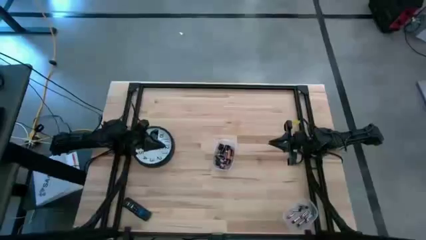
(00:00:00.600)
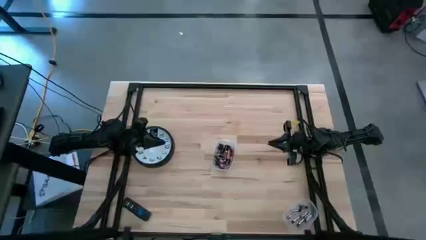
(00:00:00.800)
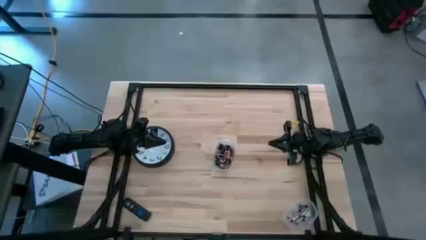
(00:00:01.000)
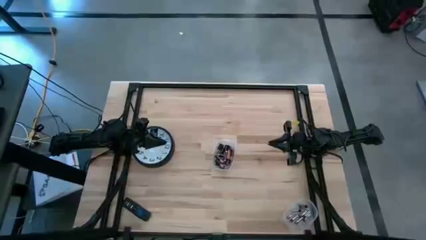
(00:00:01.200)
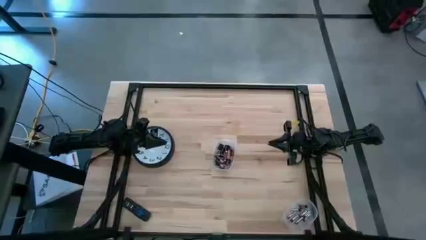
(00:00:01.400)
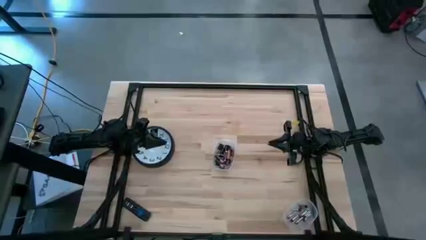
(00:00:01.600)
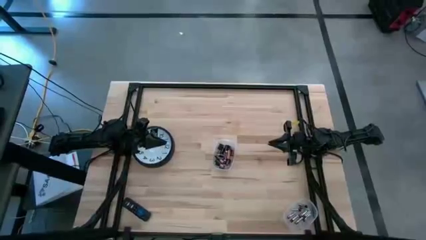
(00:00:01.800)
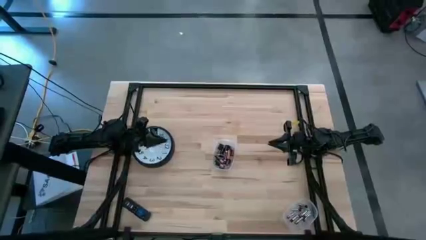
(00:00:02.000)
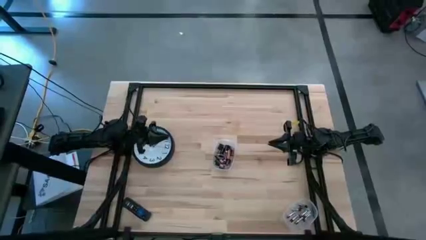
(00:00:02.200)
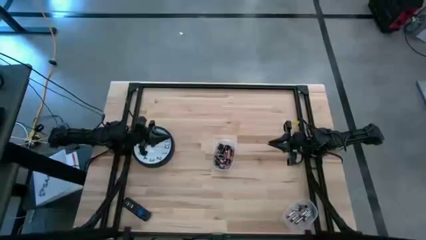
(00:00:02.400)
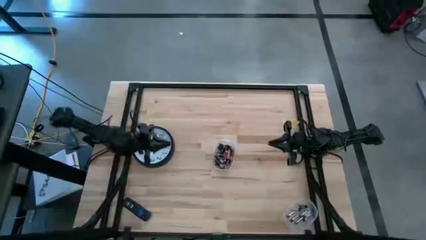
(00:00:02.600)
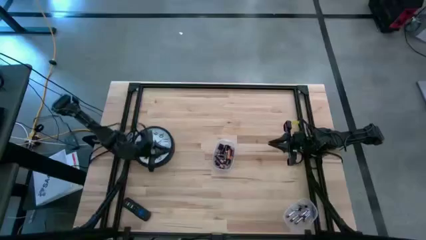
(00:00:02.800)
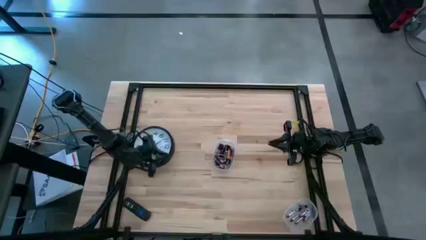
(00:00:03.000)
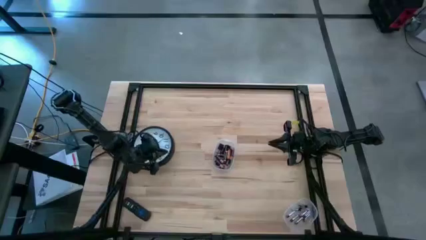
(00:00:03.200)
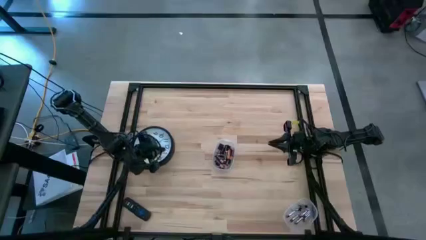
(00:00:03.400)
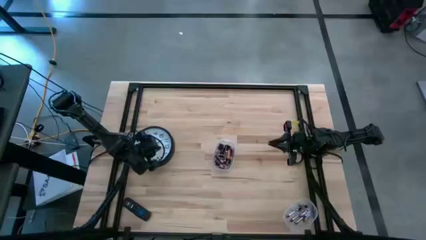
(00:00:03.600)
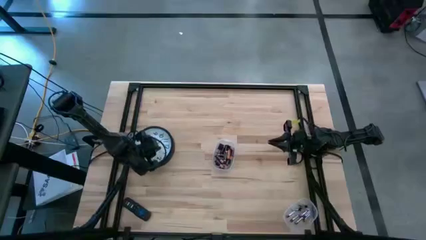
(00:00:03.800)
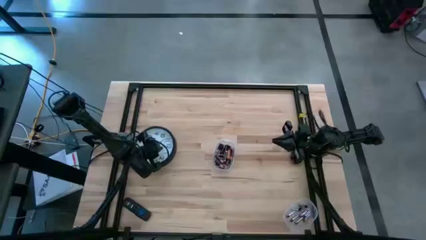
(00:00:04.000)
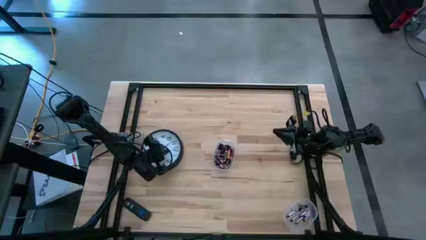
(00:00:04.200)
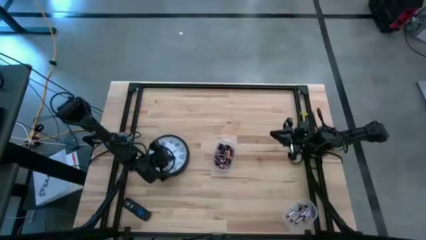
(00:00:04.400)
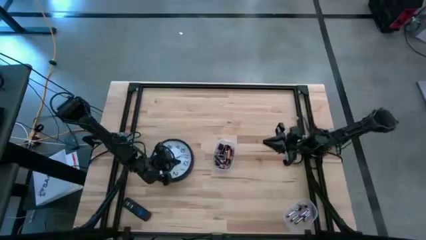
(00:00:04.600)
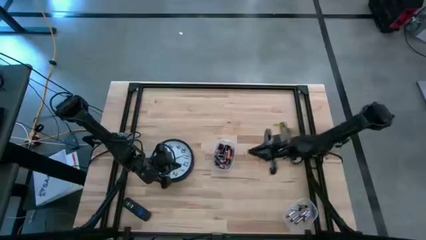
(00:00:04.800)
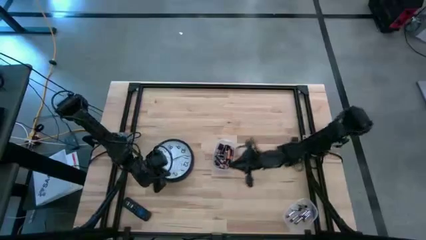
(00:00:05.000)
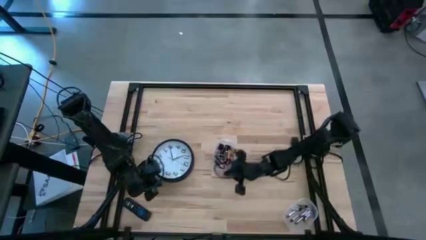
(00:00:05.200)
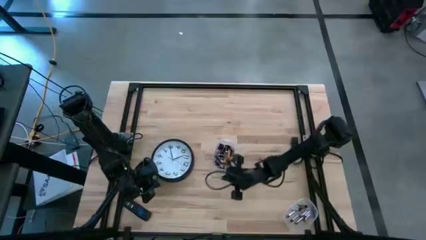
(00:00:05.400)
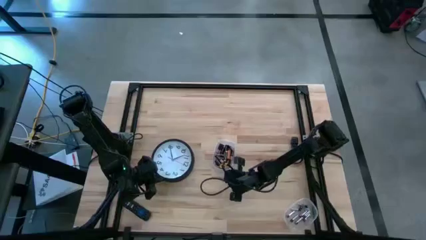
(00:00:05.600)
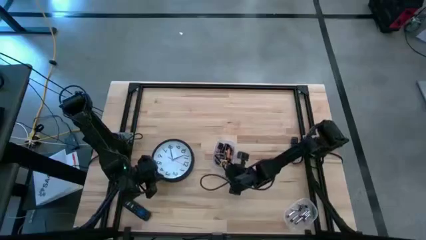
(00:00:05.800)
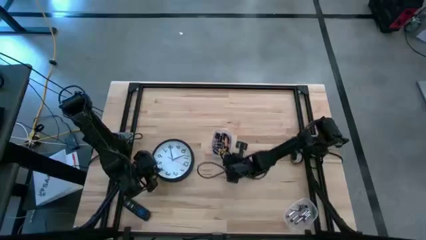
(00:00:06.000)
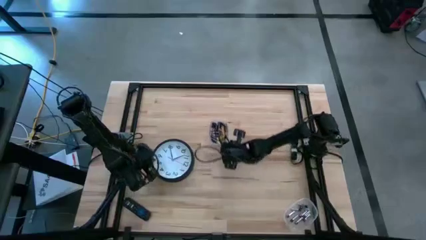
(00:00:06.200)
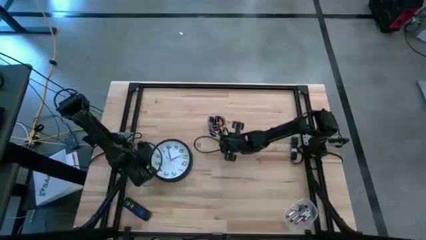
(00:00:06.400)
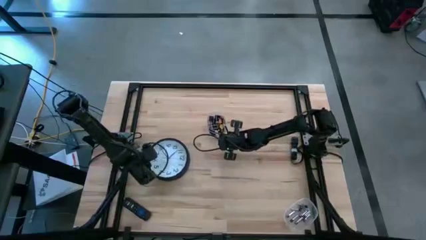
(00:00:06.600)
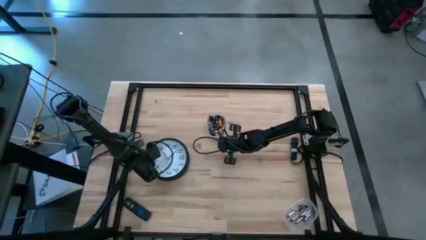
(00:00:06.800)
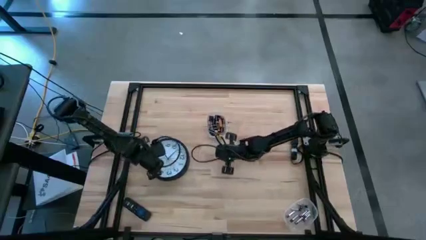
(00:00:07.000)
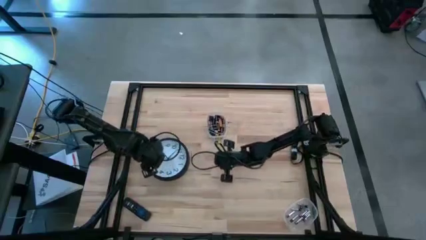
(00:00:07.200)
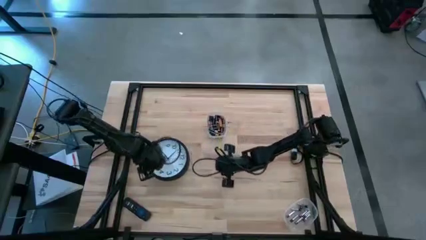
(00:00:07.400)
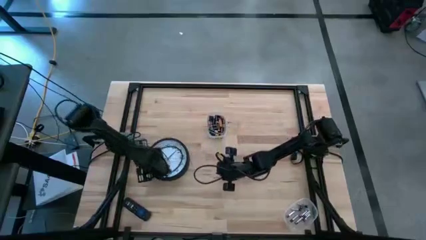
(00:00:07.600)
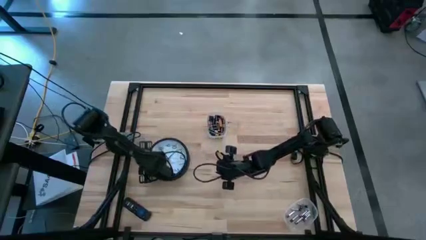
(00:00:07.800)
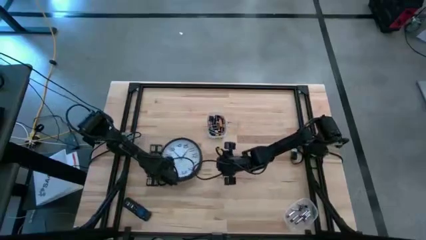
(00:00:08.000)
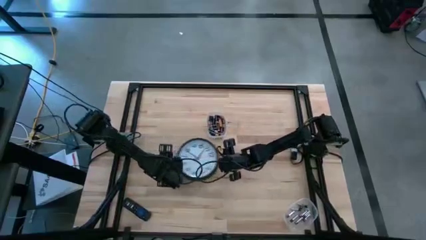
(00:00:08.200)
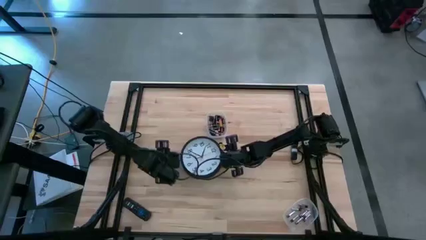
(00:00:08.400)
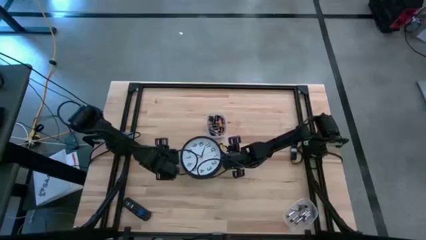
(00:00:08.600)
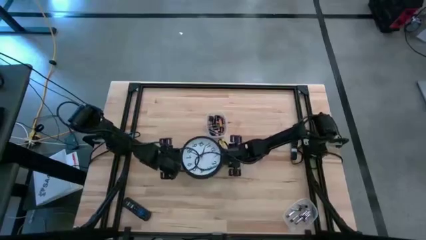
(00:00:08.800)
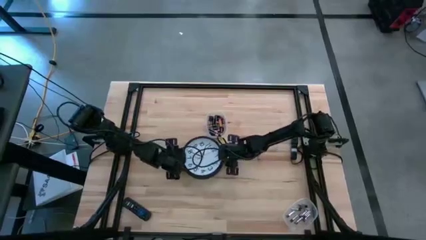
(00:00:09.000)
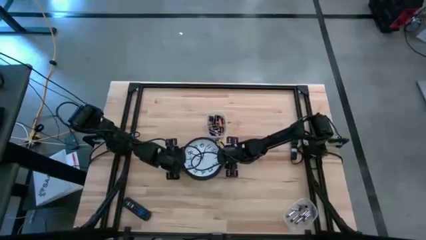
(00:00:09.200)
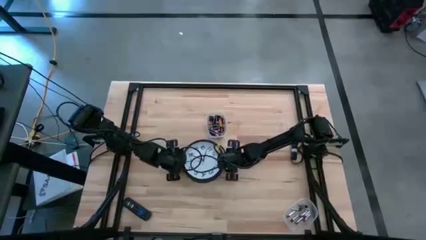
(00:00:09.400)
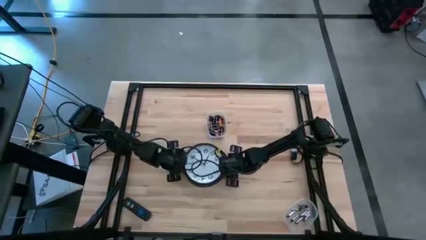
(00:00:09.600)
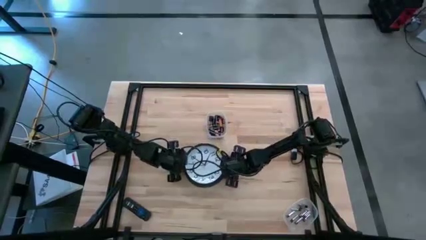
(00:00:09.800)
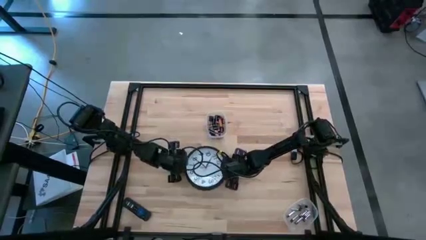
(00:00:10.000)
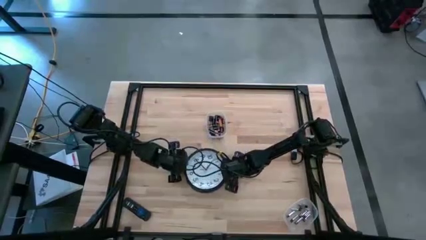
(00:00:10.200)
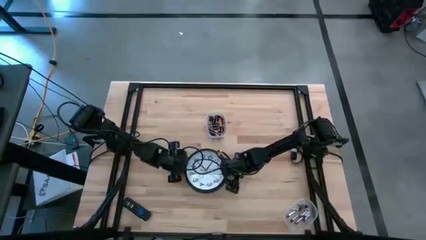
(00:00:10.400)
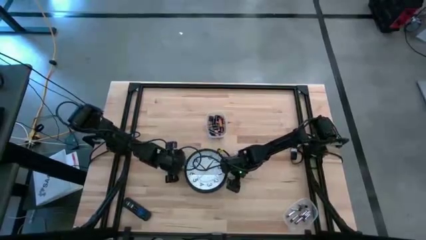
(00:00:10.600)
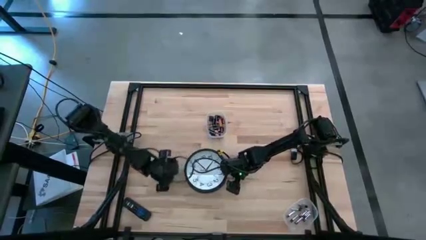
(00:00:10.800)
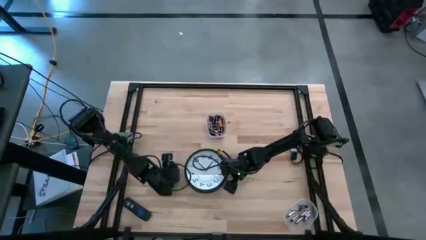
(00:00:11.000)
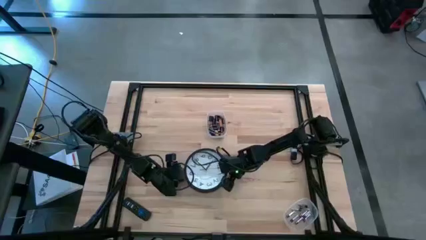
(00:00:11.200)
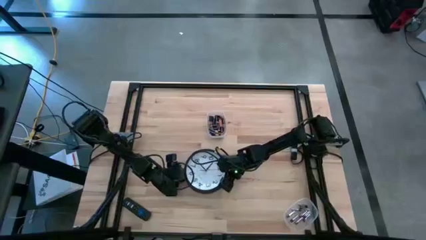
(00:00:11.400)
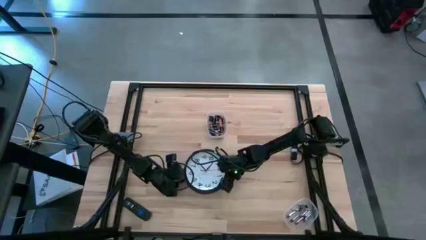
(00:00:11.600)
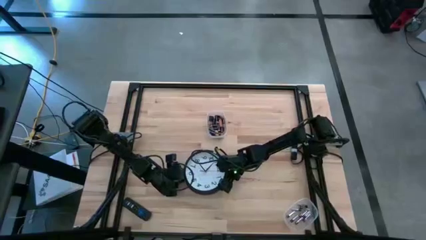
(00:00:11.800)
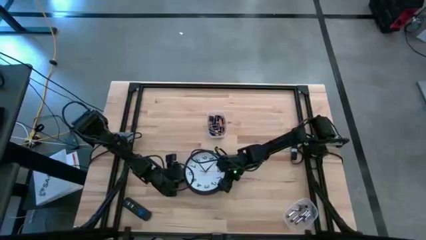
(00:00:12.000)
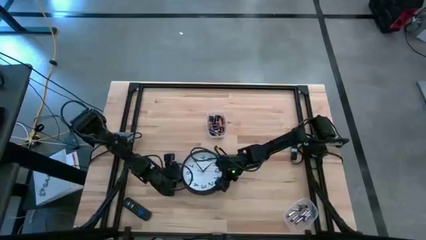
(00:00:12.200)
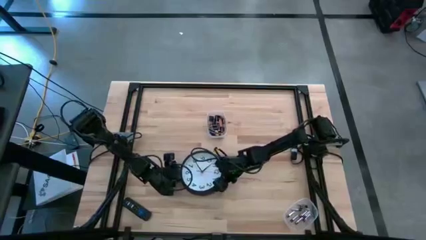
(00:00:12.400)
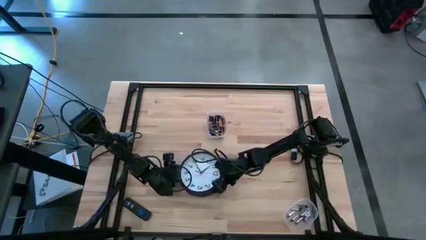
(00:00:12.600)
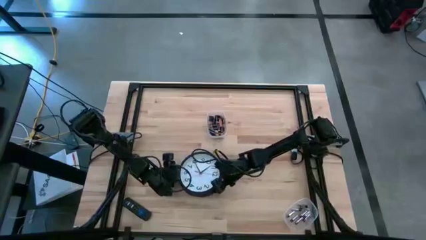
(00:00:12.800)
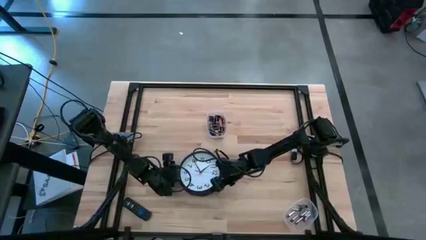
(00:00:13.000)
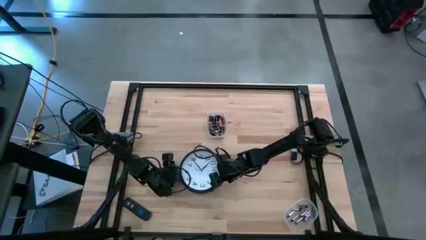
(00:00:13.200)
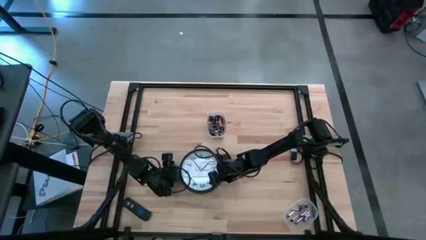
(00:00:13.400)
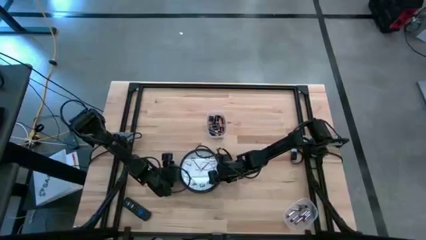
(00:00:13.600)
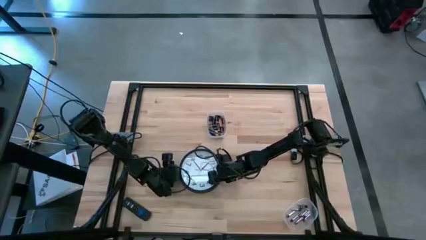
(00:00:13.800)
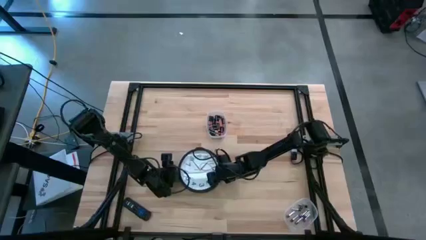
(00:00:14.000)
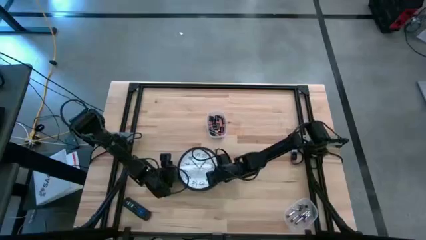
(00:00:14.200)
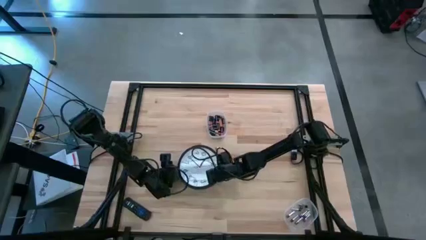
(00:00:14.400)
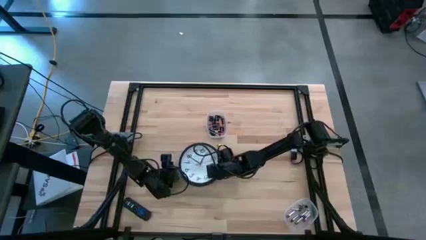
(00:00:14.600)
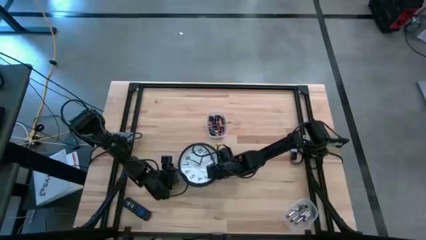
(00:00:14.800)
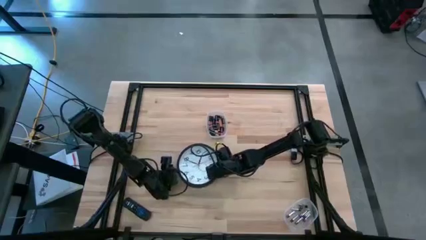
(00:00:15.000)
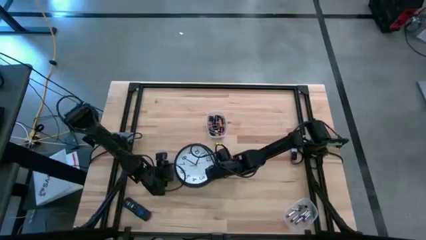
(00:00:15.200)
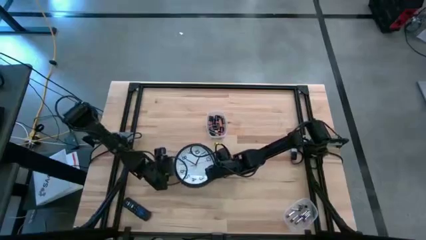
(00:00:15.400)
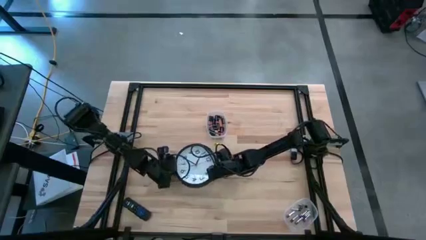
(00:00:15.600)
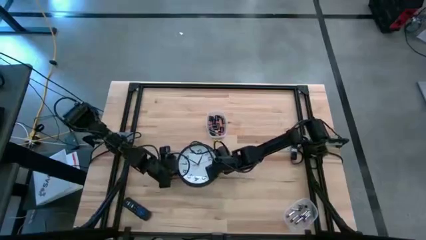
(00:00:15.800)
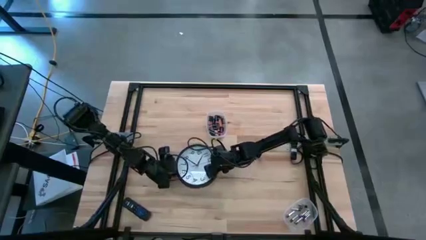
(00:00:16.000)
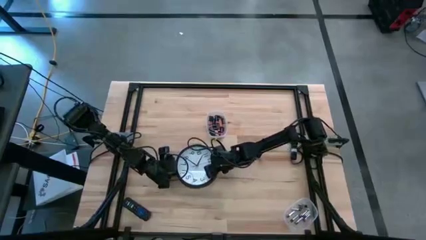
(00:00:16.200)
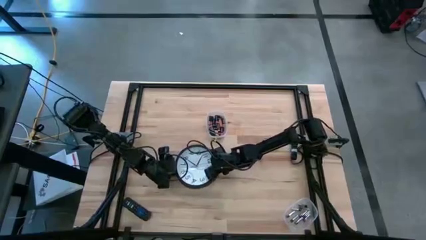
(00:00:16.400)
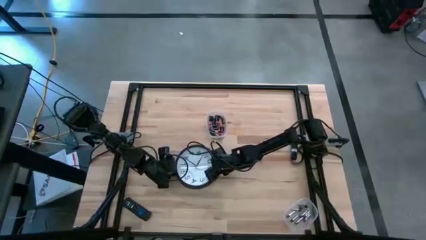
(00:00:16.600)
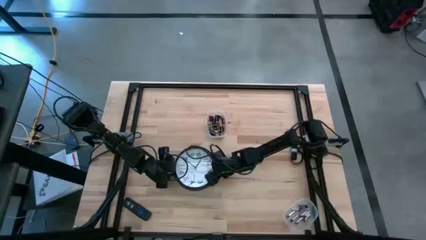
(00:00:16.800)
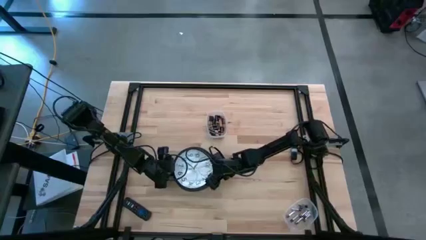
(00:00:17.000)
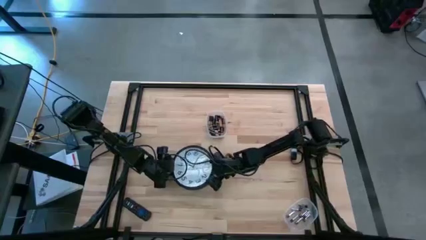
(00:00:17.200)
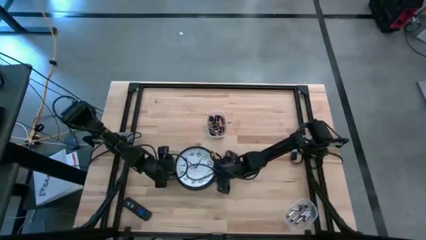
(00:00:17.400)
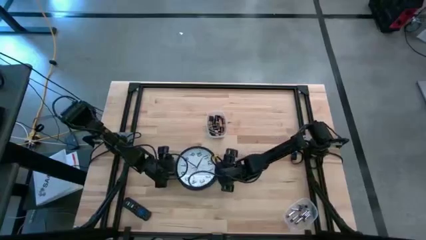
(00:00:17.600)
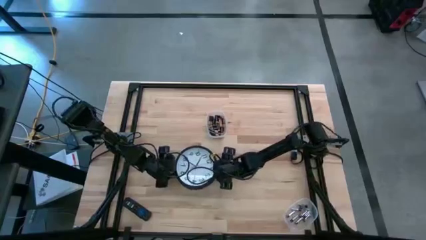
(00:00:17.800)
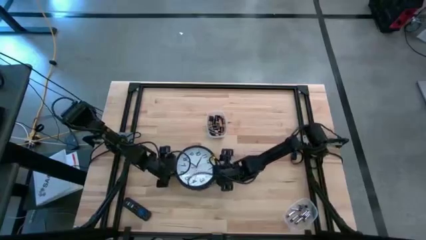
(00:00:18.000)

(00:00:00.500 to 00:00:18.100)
Task: Insert battery
Insert the black battery into the black clock
